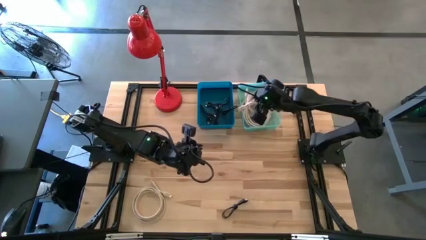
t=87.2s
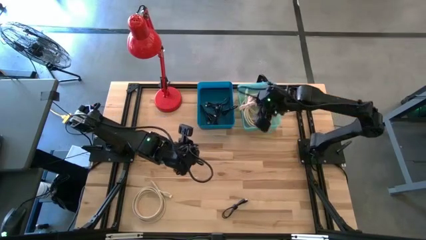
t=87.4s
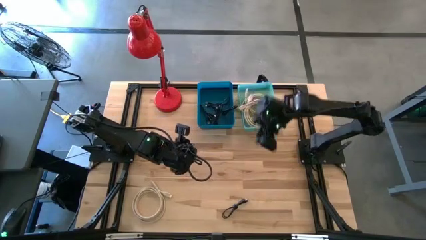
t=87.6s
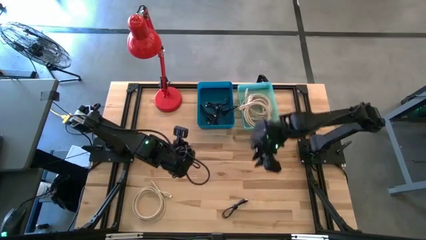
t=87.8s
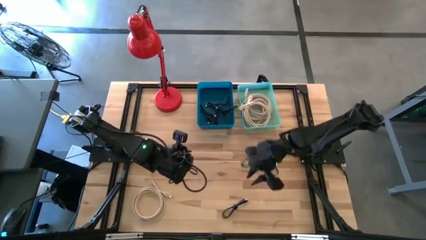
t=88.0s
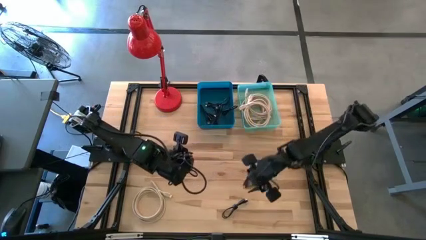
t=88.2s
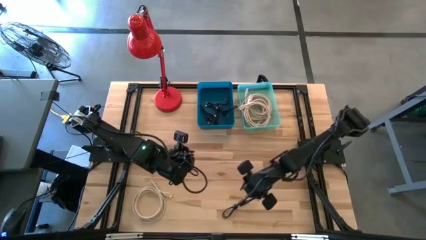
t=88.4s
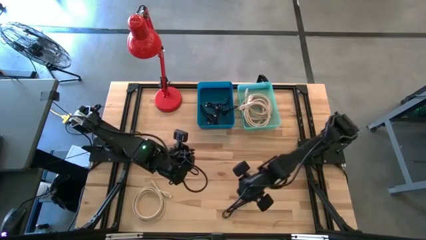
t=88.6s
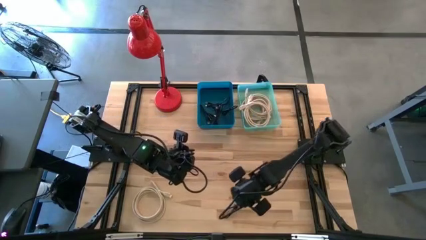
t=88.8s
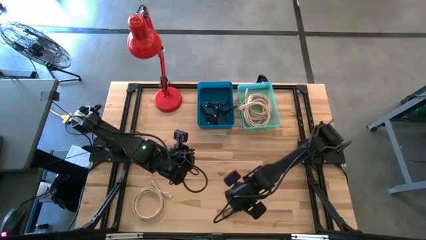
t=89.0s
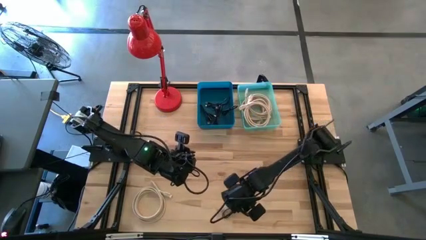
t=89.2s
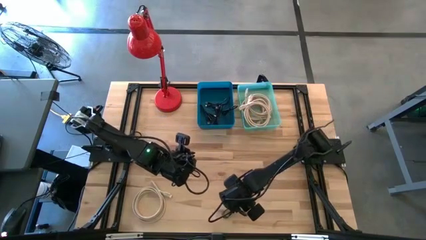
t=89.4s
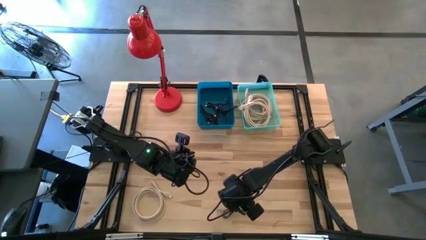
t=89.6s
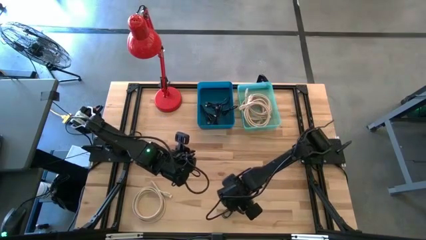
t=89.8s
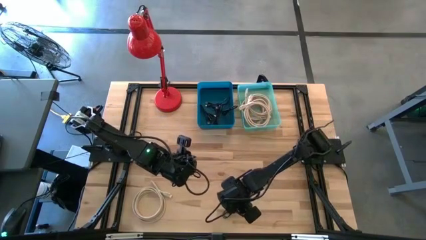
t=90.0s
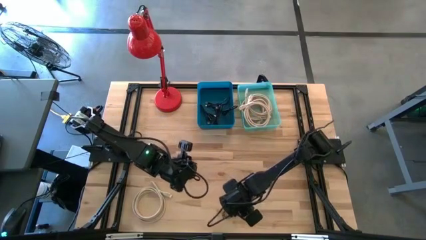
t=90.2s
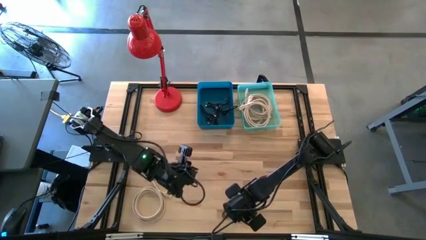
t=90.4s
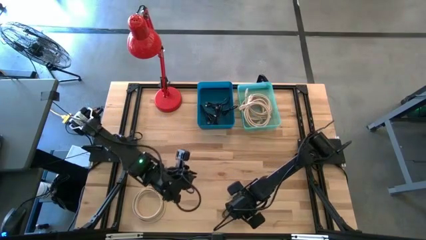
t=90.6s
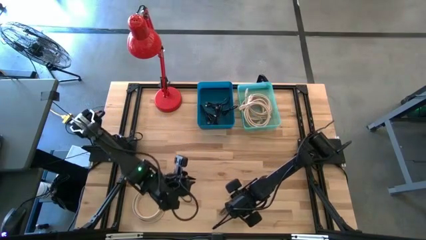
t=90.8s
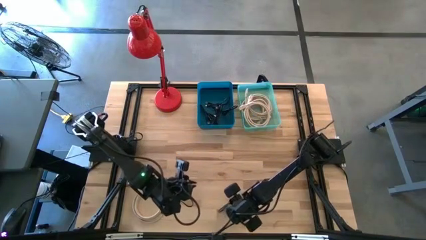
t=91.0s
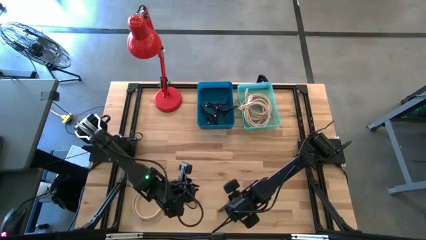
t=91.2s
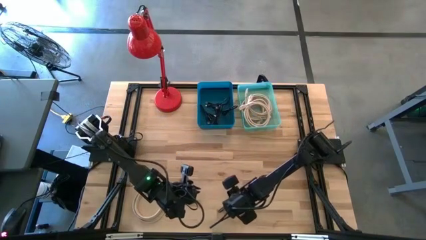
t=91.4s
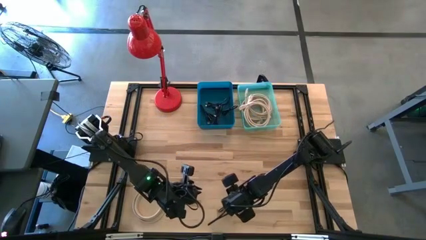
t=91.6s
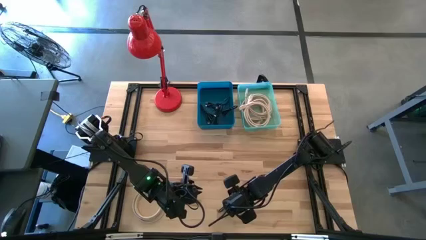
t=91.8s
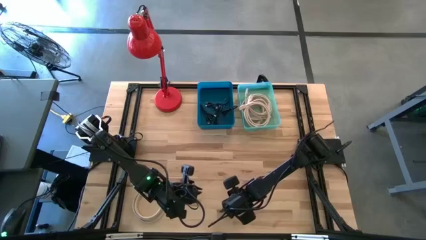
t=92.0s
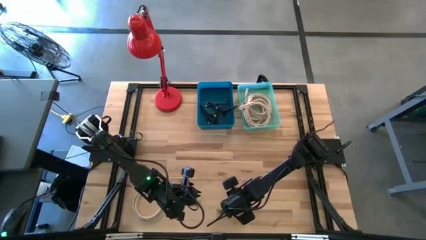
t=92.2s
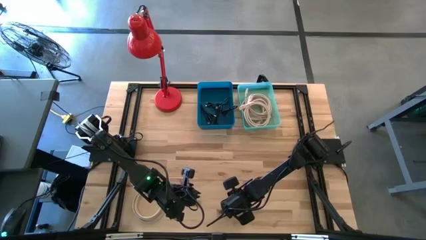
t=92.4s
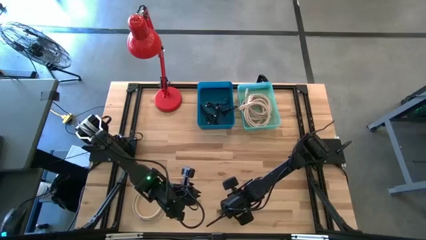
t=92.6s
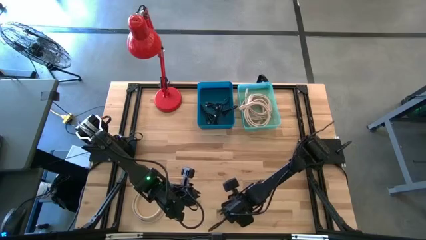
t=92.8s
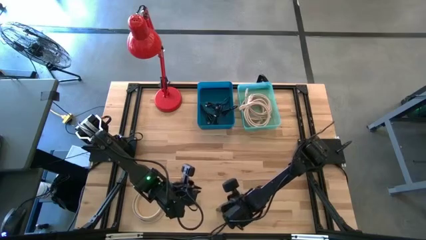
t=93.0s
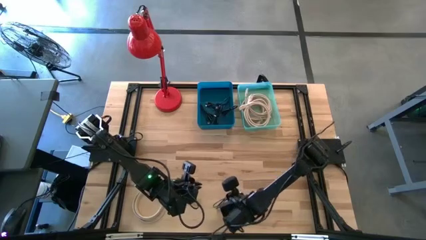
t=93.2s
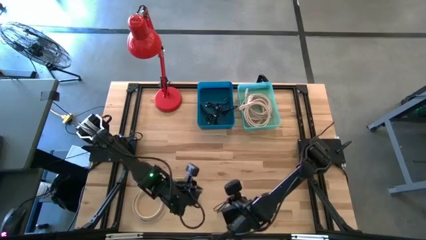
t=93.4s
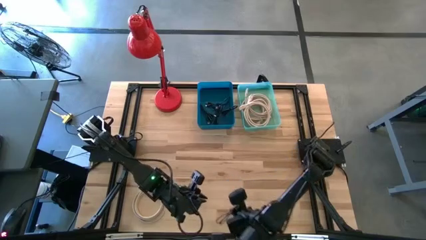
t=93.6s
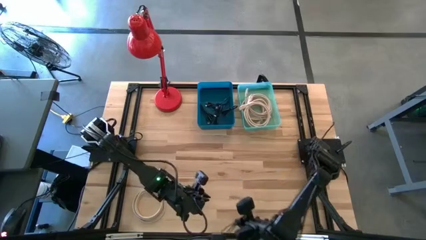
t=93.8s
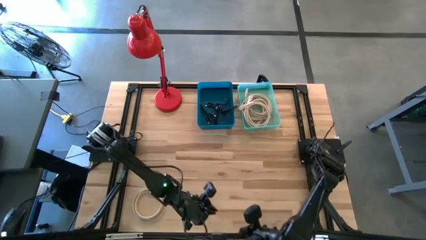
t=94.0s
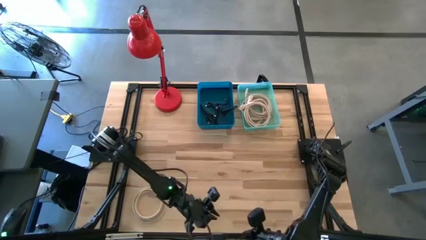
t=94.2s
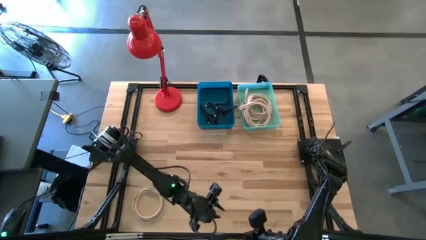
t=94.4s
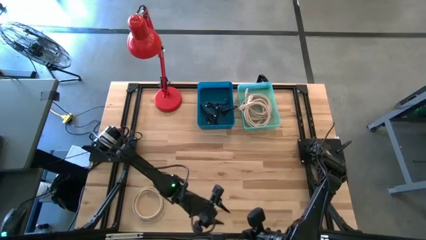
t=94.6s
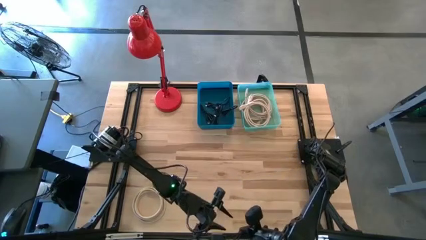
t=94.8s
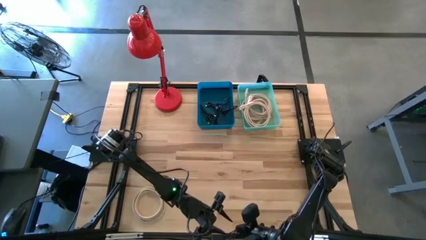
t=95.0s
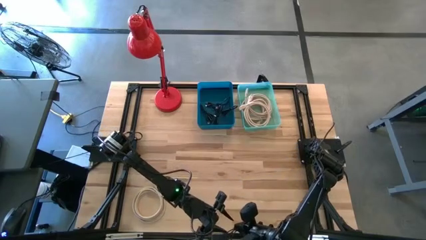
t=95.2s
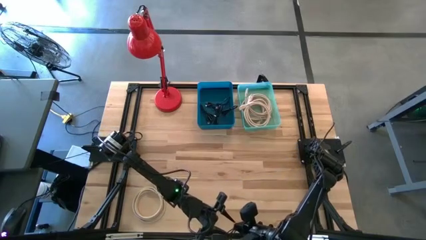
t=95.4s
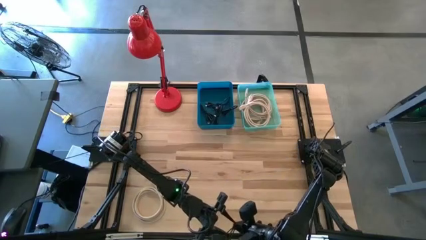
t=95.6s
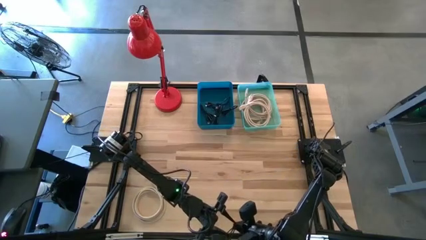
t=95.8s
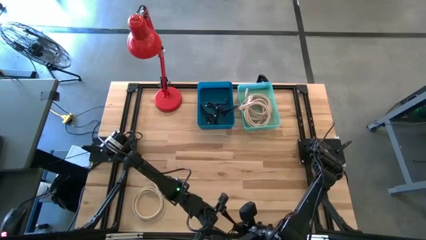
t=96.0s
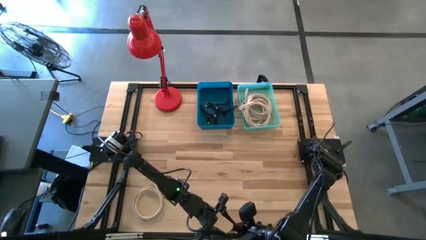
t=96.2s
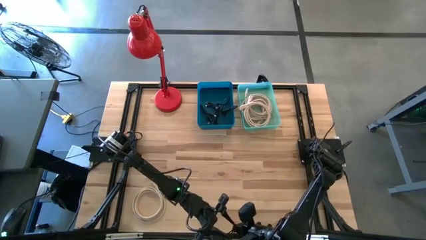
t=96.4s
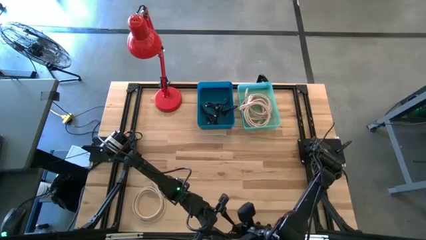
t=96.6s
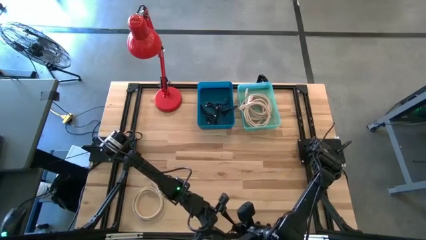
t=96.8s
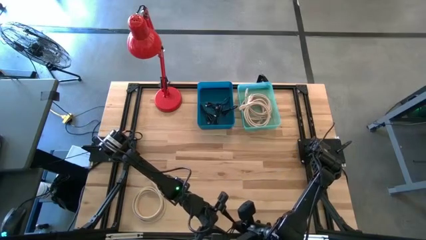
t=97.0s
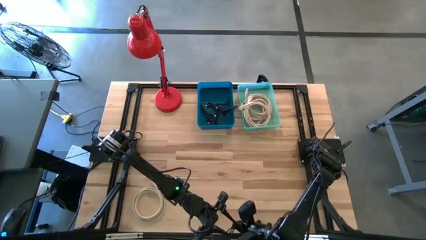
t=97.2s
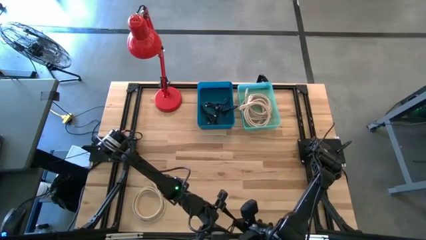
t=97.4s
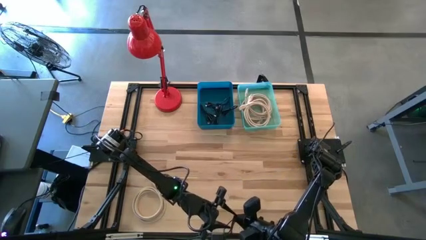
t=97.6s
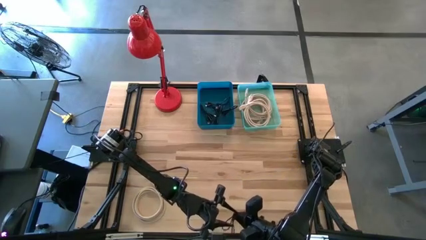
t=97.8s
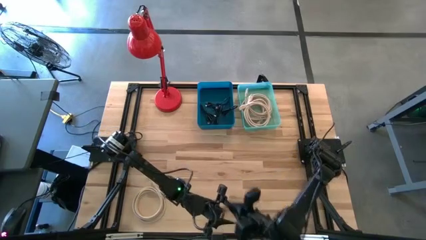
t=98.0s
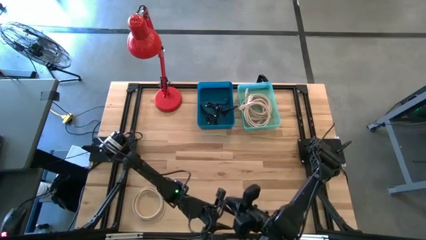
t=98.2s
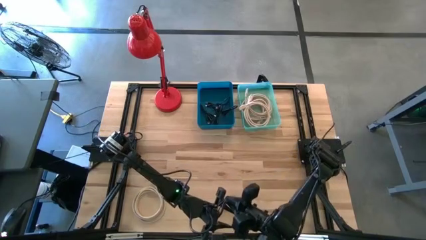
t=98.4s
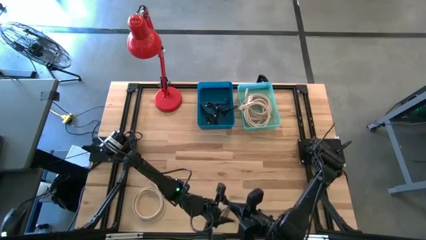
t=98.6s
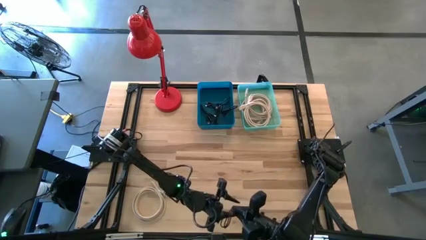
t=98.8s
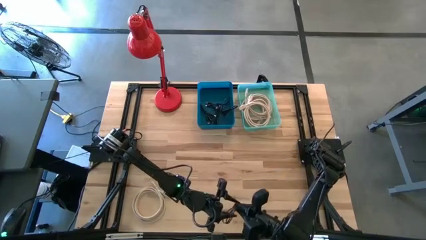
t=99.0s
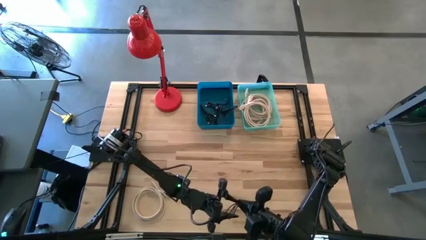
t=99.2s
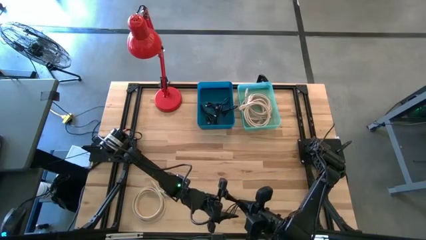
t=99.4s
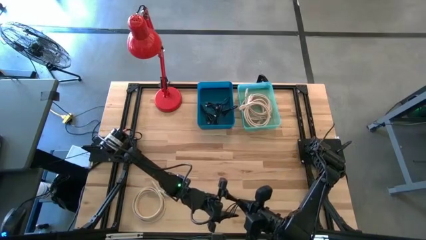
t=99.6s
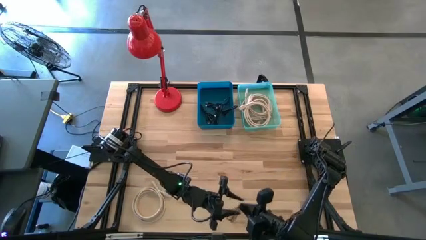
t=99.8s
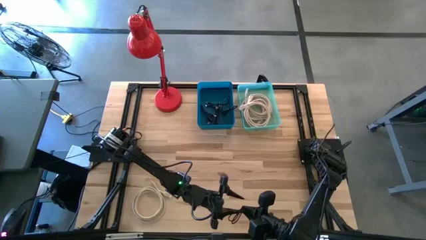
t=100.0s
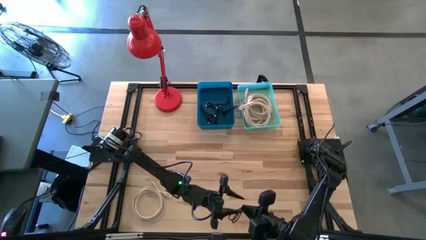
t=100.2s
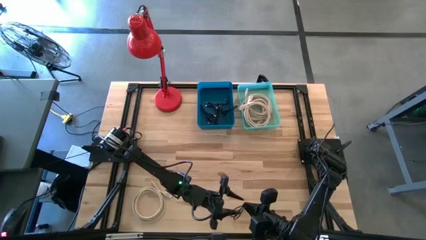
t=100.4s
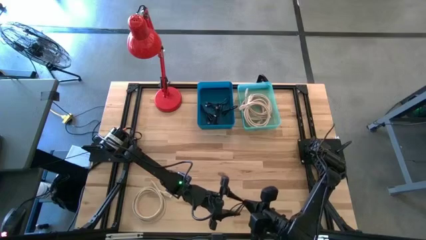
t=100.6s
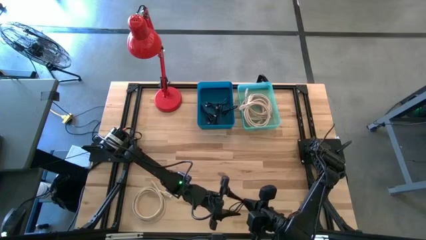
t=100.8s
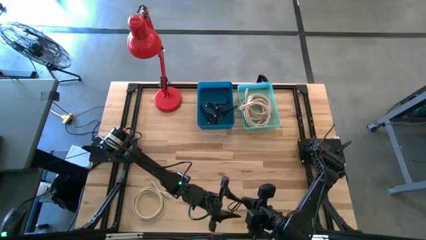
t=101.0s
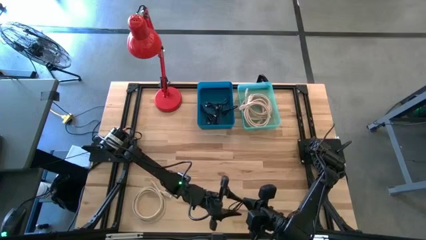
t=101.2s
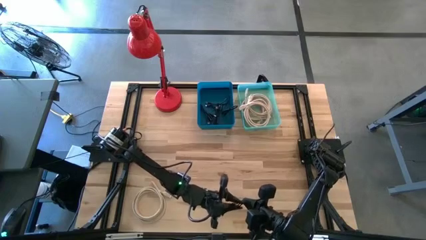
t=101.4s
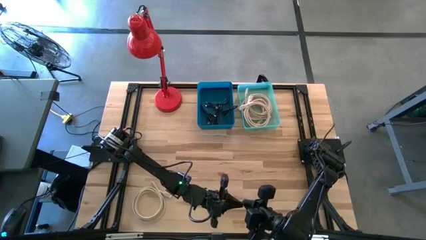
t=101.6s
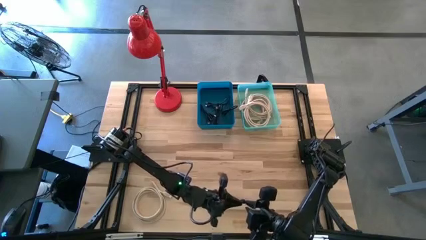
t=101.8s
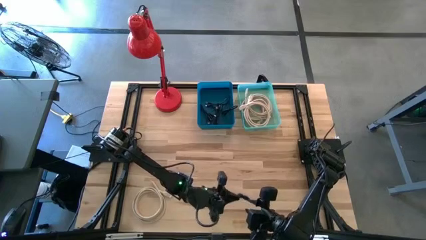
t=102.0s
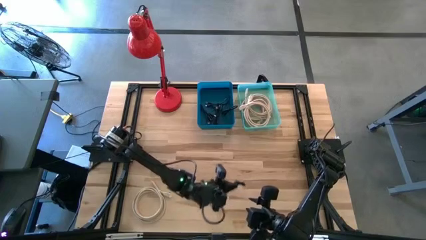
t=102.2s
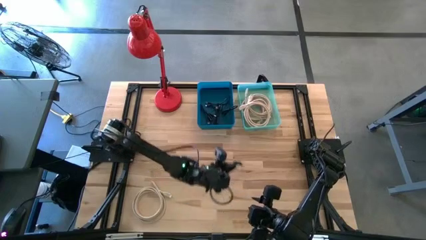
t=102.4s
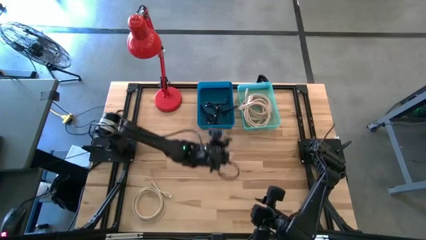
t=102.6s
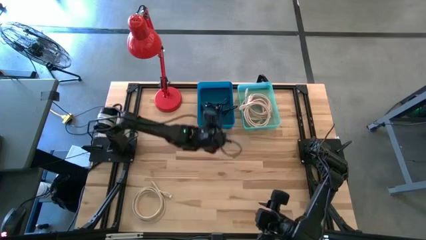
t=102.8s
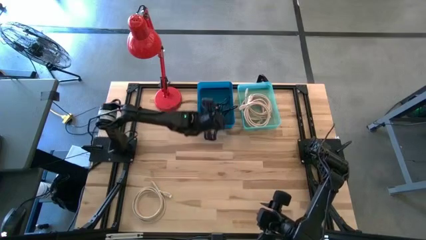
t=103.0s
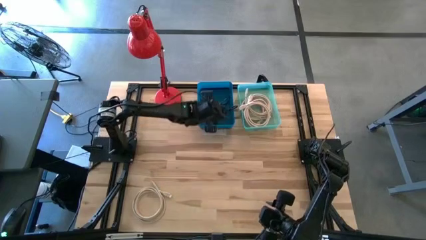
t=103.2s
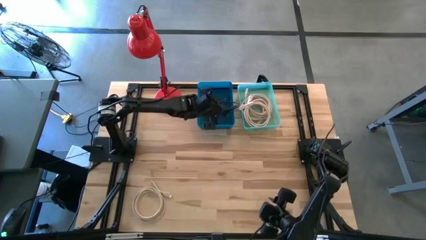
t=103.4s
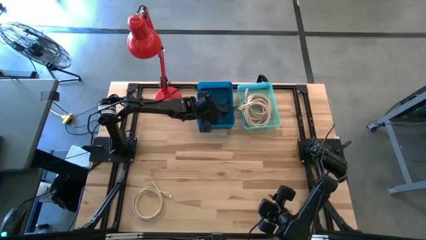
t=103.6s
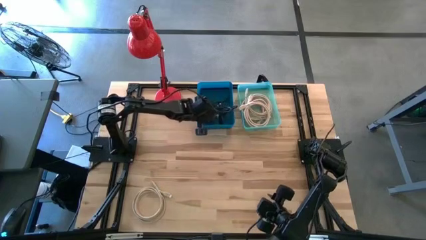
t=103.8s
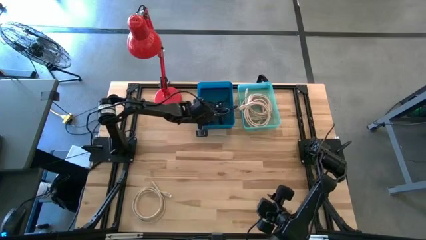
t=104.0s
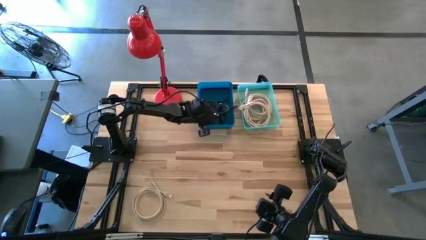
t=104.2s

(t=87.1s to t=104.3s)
Task: Pick & Place USB Port
Put the black USB cable into the blue bin
